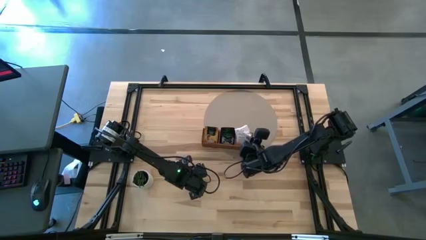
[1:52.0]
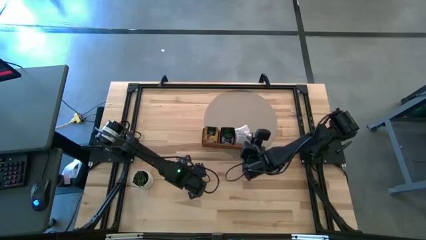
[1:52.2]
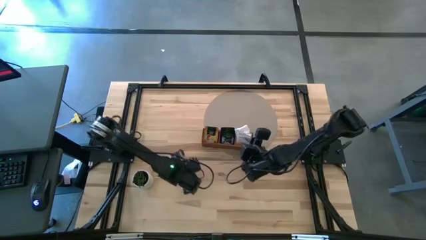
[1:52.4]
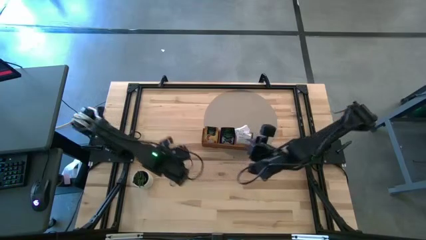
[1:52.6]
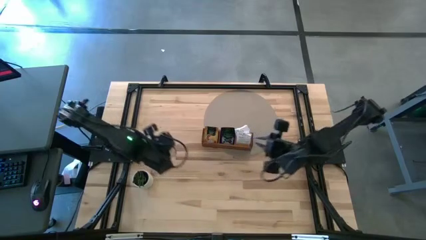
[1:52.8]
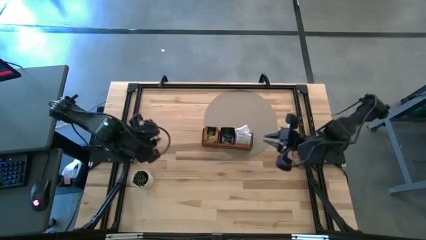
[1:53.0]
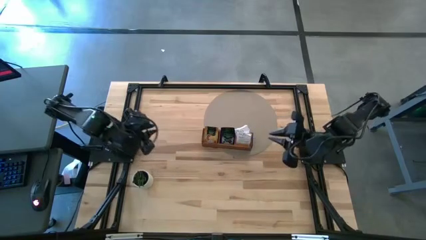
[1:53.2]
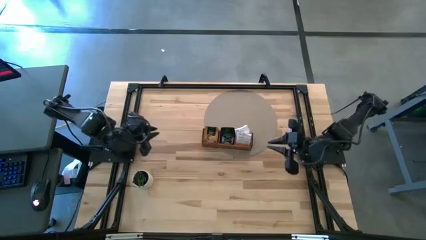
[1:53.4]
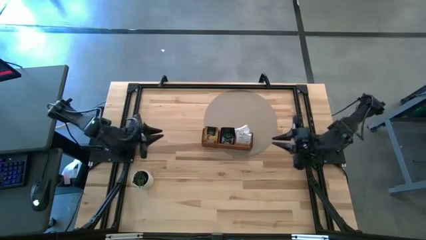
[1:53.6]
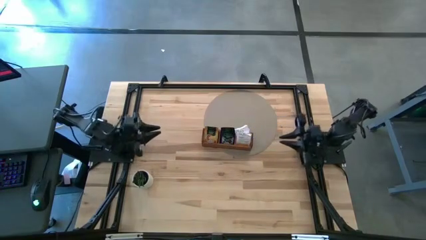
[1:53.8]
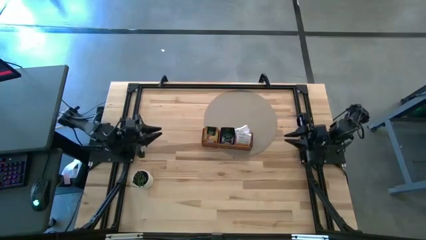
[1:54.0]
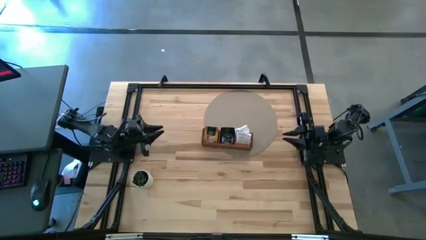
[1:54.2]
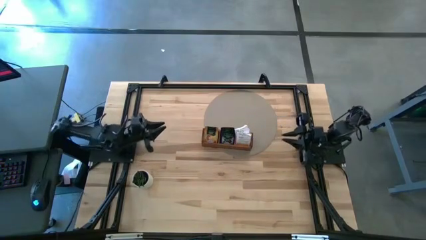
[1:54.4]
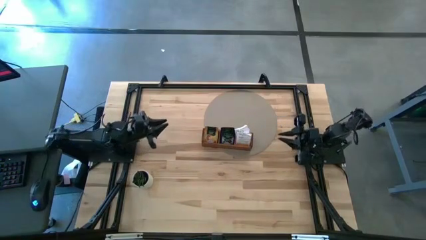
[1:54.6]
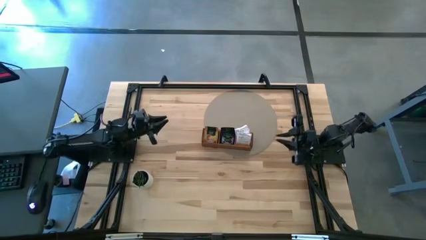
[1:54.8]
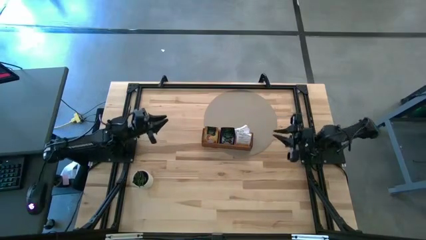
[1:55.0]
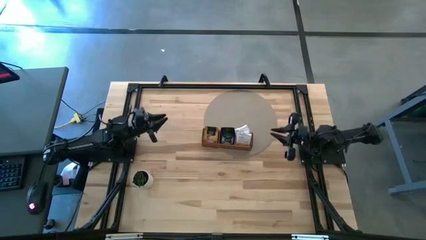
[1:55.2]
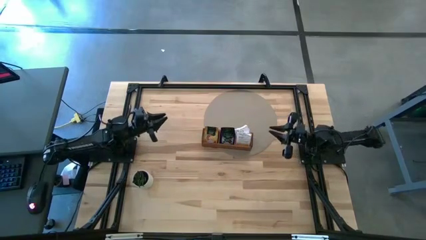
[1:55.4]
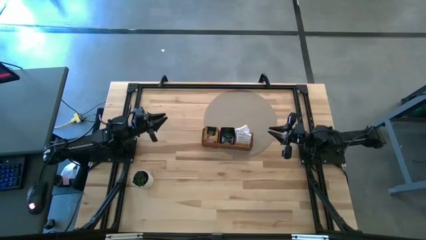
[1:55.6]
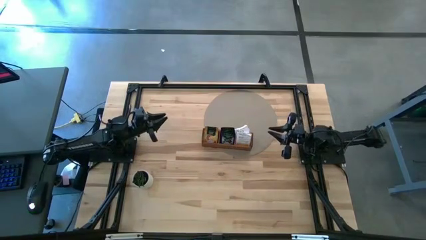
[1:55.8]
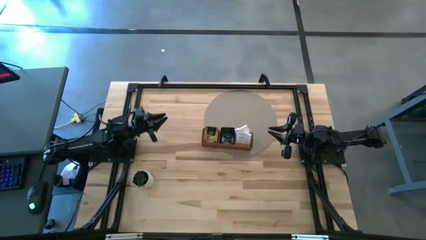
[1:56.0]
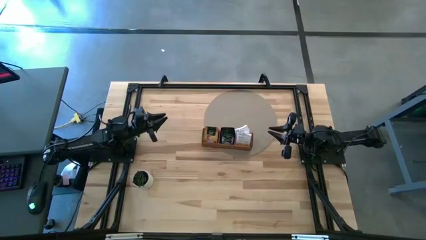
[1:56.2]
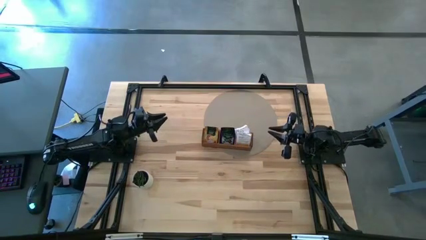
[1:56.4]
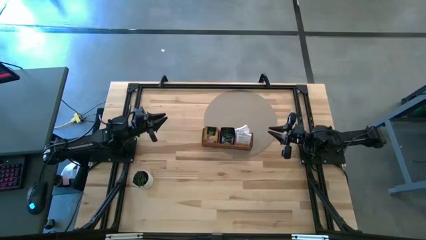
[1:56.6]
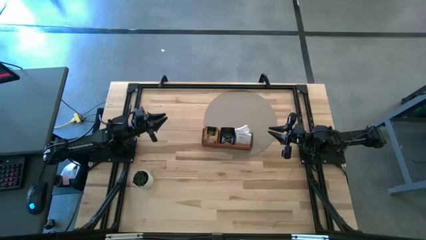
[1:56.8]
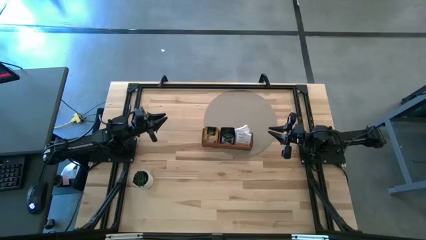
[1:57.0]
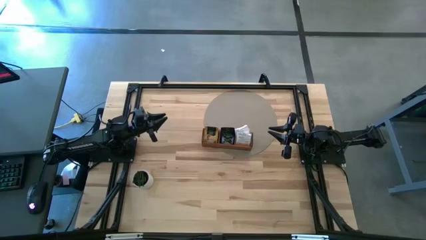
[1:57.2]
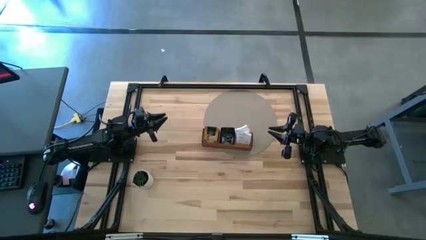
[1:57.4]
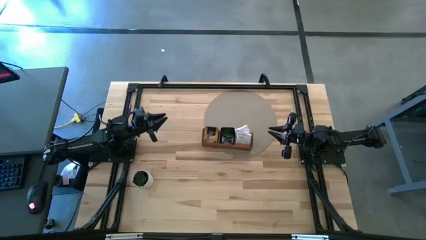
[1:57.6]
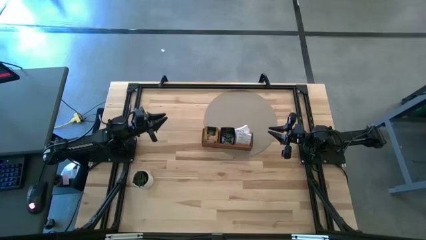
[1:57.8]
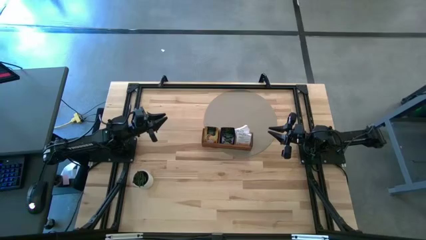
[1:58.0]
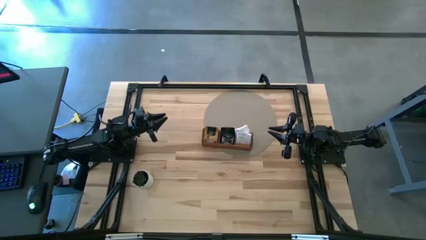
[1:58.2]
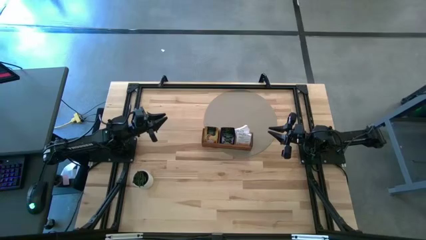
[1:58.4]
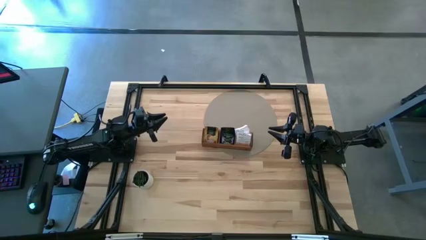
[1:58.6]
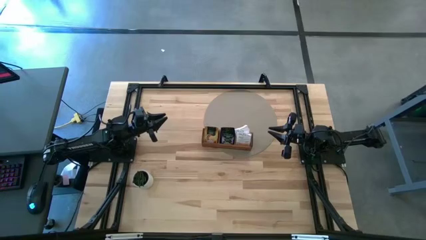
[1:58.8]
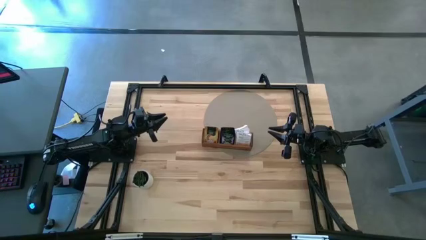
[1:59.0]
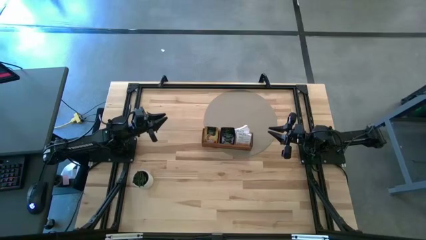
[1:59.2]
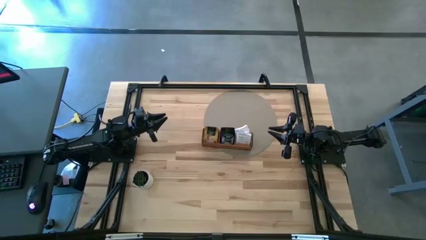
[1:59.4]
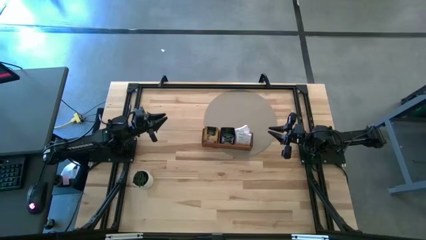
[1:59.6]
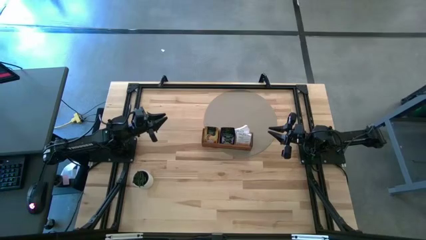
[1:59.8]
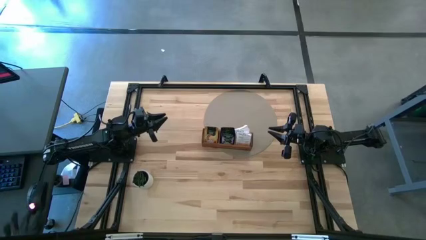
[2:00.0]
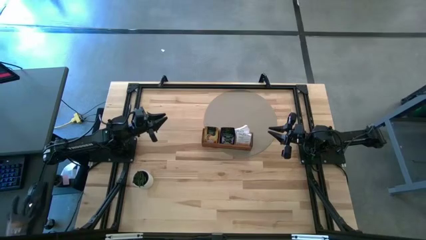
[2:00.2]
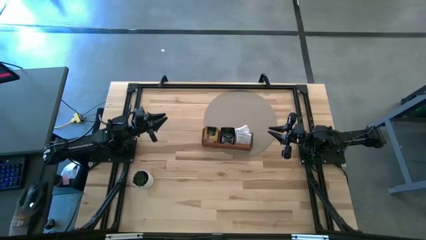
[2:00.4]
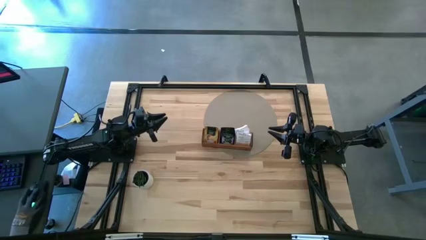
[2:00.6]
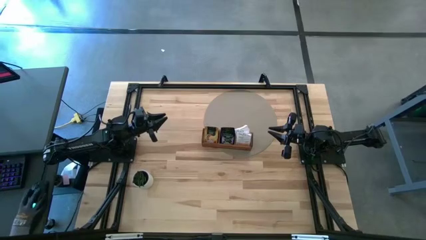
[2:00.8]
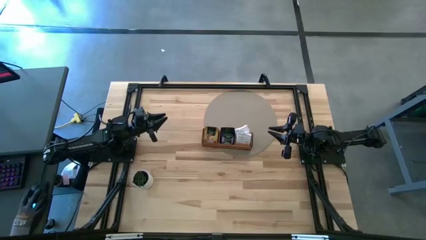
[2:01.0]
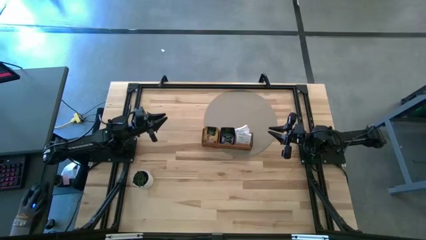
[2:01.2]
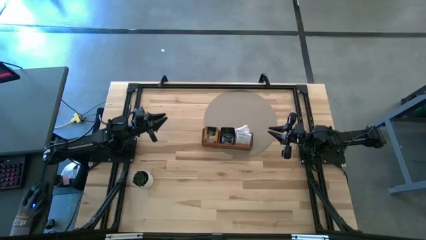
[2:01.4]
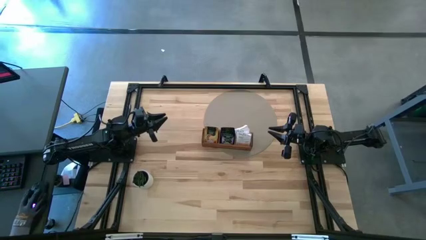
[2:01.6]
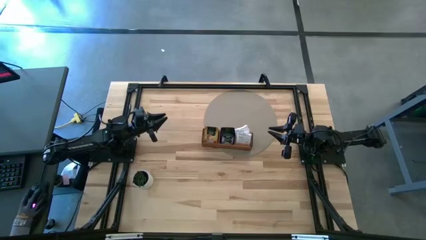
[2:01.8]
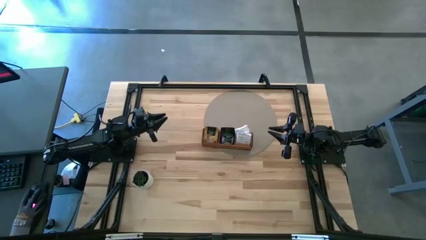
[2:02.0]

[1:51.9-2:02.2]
Task: Pick & Place Tea
Return to Home Position

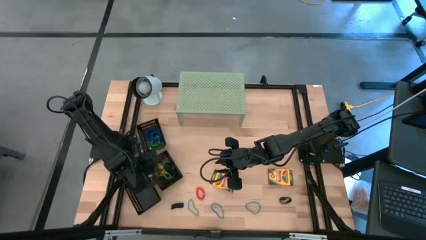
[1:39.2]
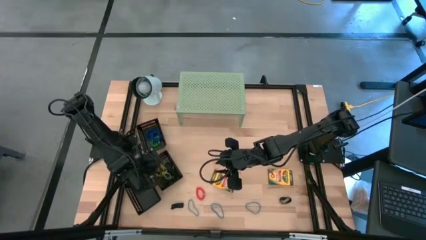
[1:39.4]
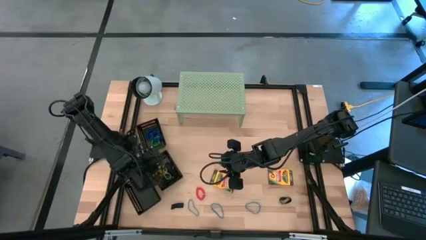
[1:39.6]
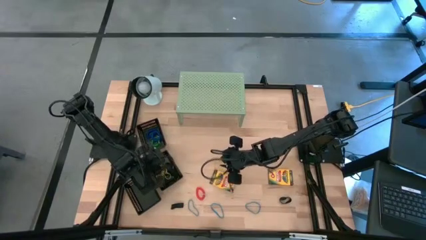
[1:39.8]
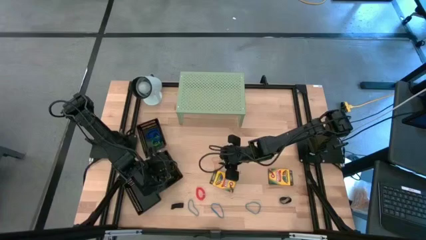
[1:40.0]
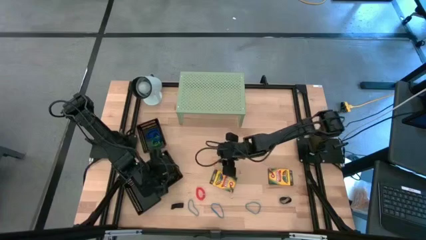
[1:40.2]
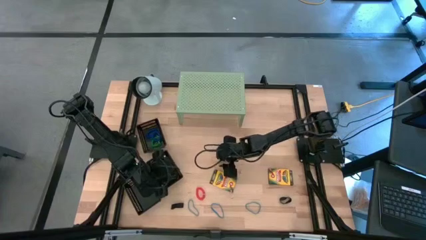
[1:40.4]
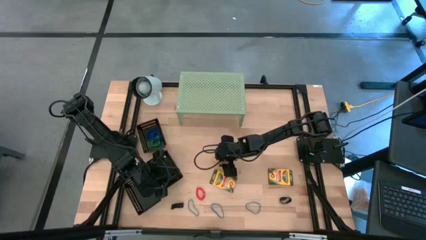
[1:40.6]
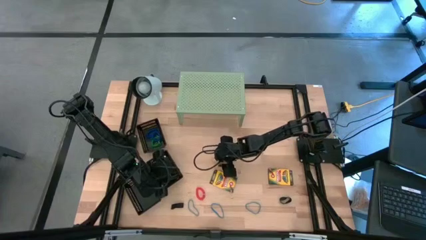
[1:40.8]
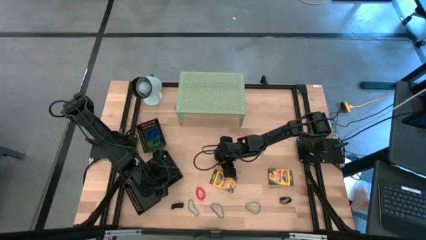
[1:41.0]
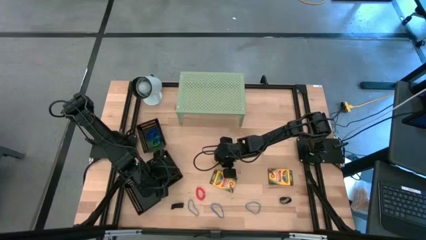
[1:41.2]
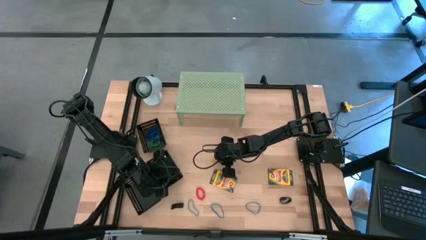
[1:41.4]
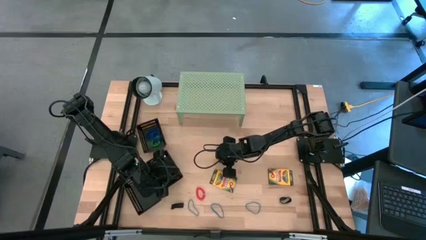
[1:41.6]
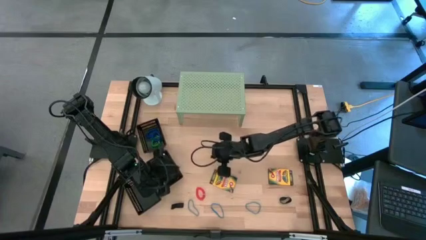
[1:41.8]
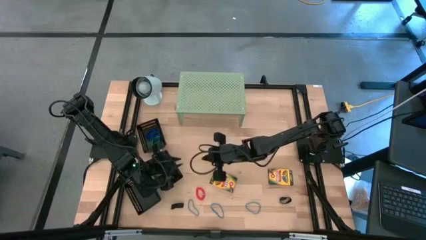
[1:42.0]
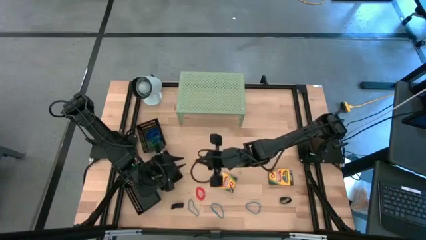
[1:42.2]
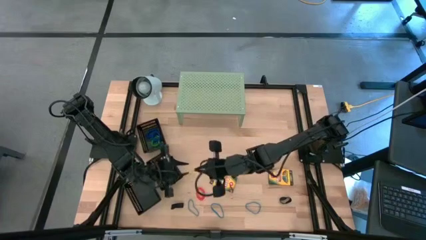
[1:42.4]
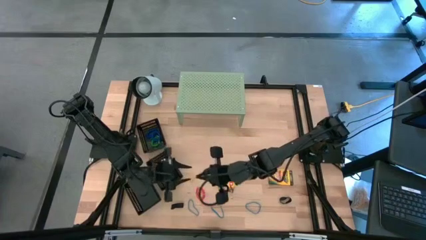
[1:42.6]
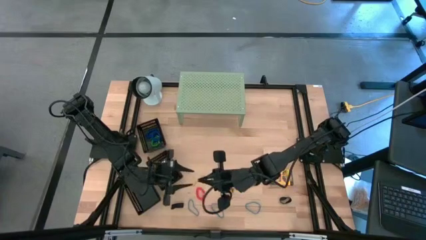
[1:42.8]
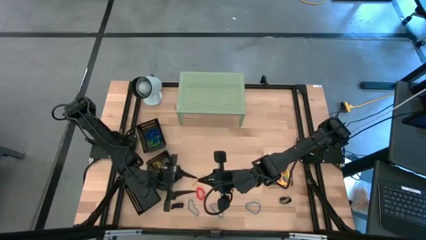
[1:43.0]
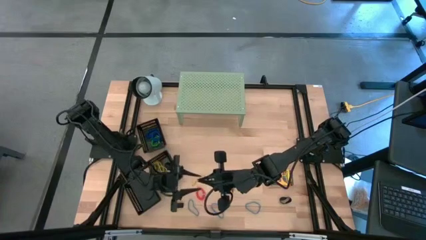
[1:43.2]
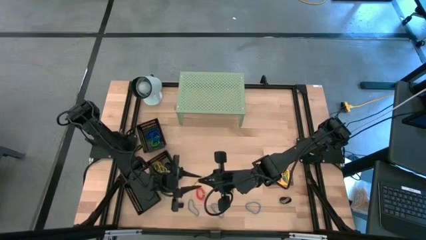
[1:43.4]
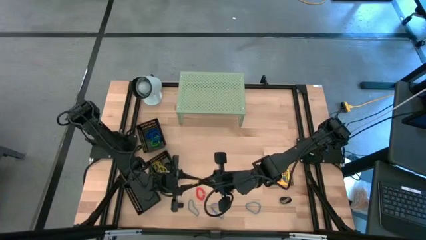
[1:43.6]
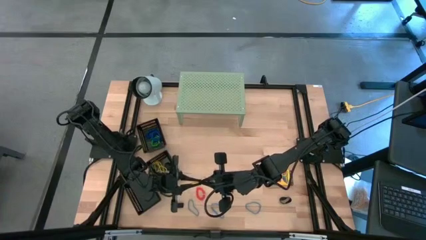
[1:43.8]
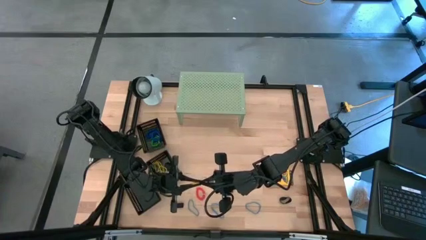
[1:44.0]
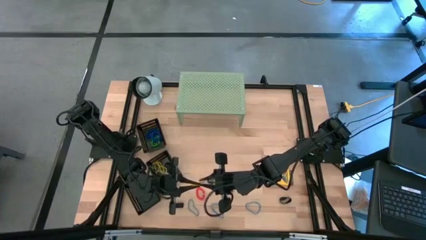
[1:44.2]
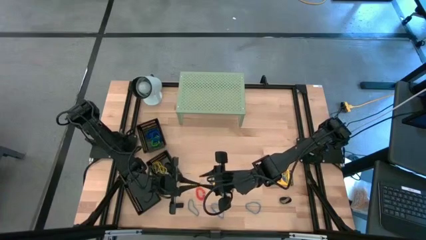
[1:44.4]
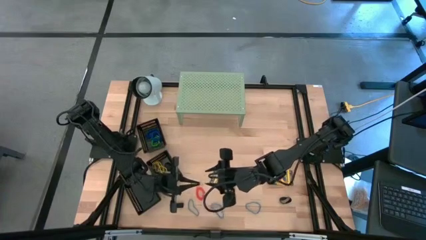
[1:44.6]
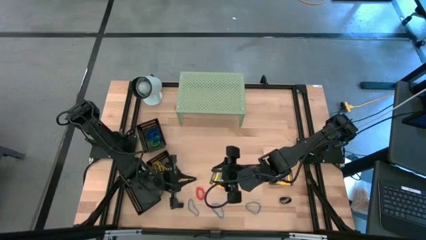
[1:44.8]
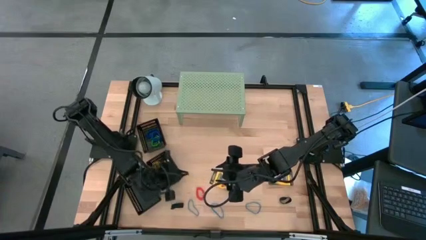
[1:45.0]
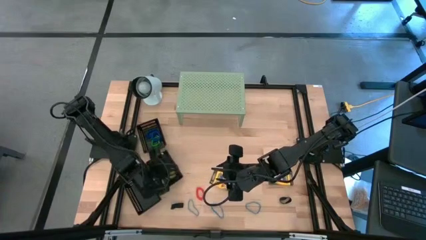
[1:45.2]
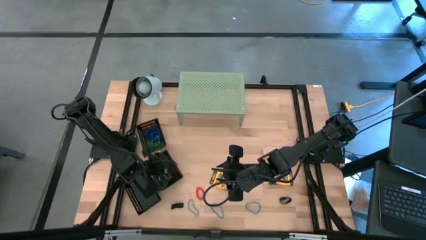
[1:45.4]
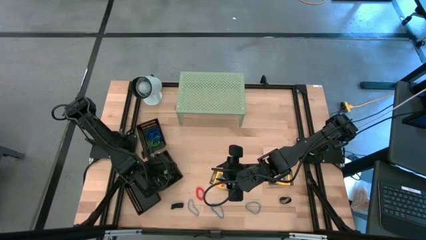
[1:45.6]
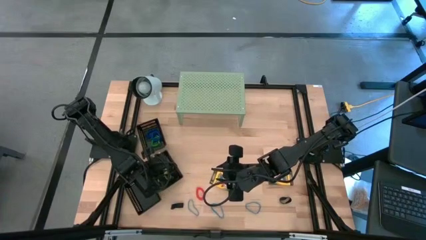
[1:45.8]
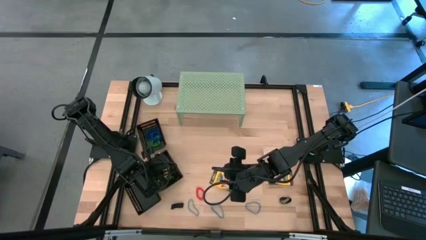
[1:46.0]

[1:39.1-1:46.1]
Task: Pick & Place Office Desk Supplies
Put the yellow rubber band into the middle black bin
